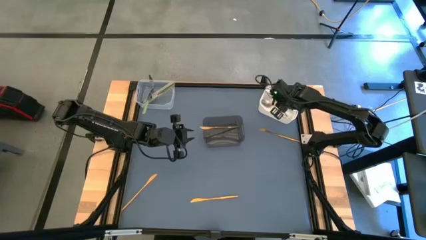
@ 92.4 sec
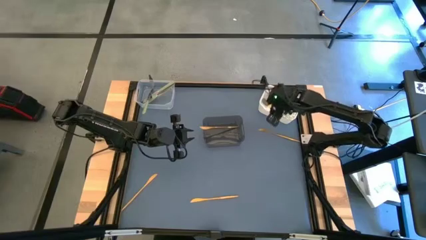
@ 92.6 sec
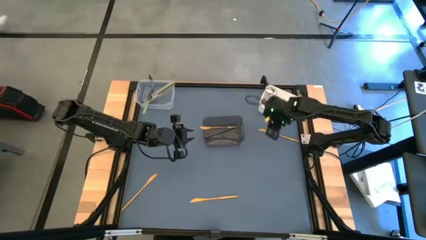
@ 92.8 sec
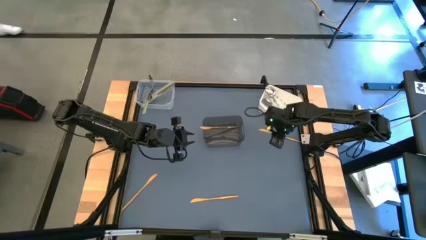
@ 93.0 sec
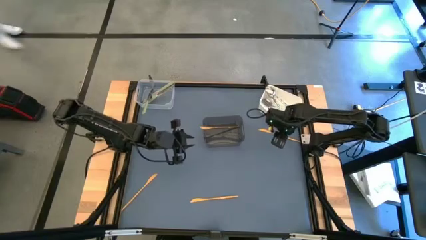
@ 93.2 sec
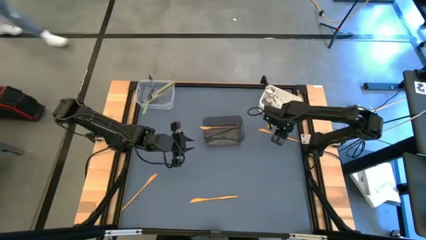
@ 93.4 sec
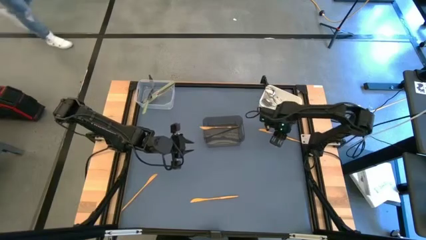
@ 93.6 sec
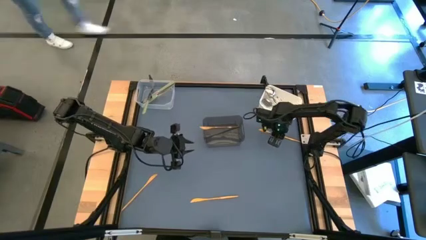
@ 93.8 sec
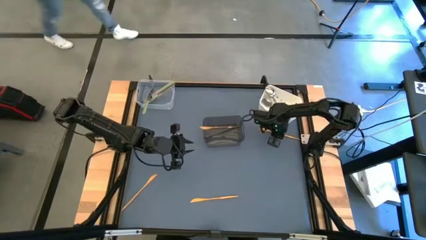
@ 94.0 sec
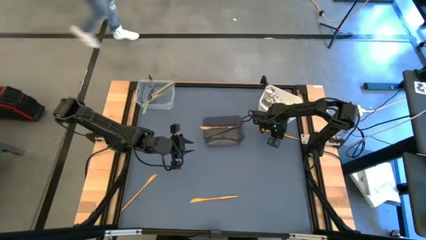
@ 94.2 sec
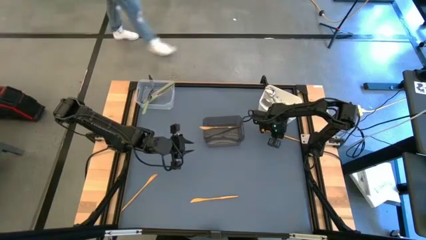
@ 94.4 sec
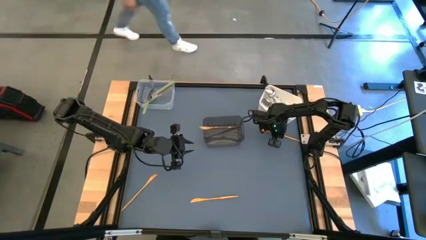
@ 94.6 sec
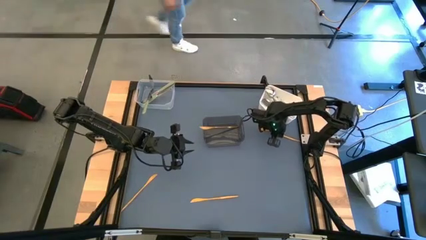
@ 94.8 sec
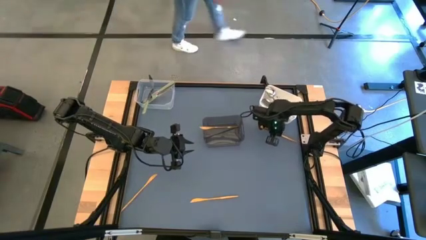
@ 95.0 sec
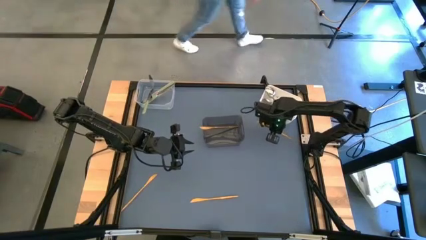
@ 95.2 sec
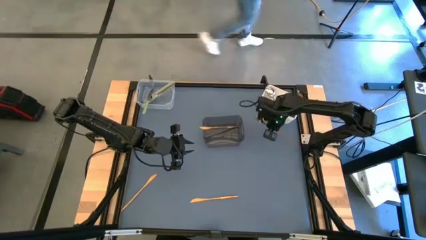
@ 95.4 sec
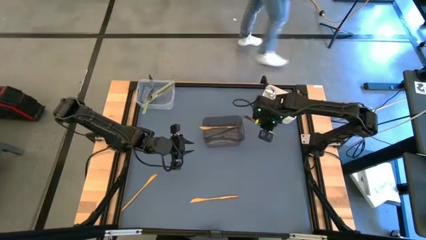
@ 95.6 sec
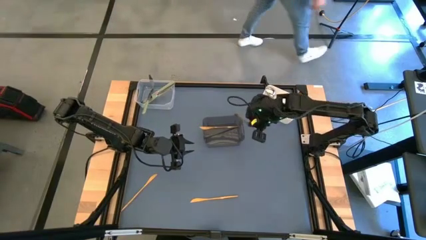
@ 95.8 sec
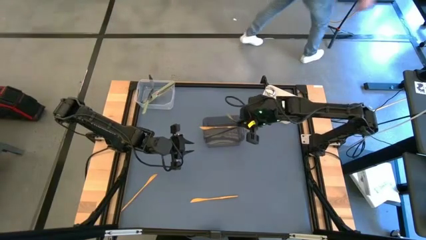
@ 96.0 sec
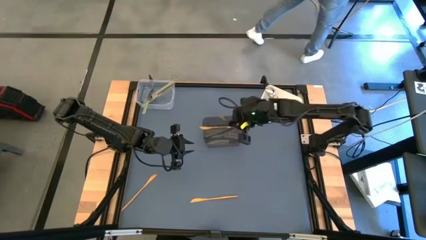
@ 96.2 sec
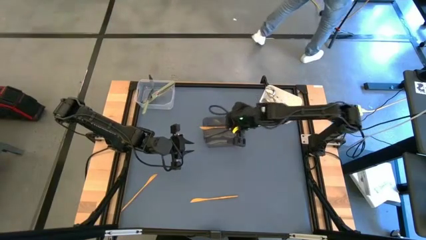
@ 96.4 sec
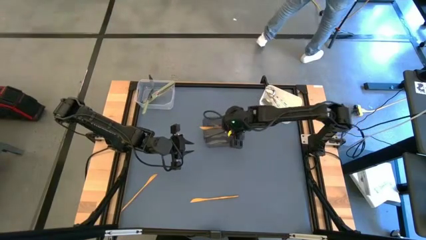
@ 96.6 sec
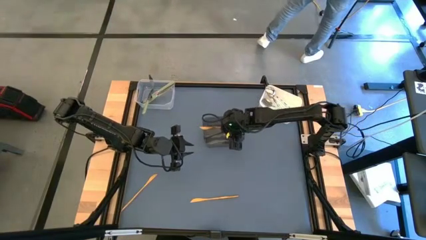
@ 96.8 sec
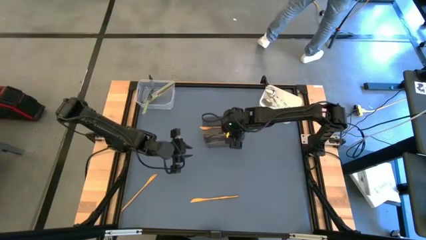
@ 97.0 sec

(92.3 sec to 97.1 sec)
Task: Sort silverware by color (type)
Put the gold knife into the black bin

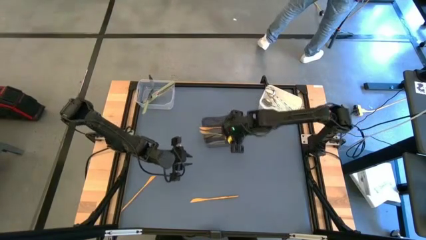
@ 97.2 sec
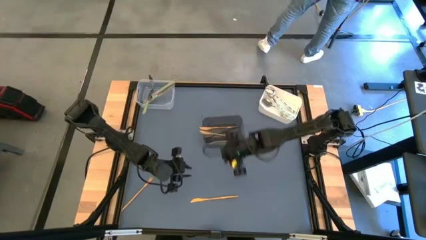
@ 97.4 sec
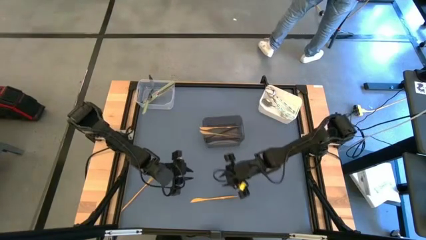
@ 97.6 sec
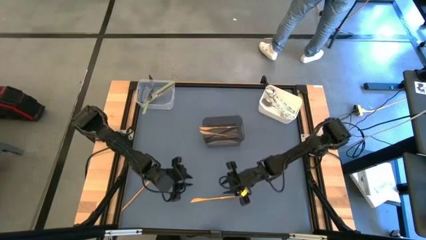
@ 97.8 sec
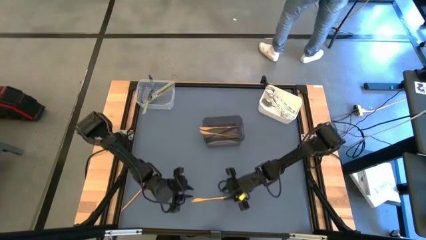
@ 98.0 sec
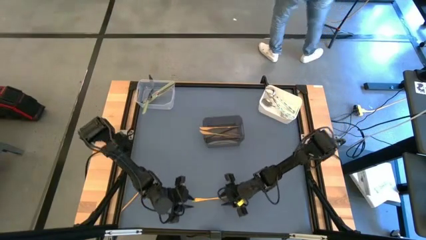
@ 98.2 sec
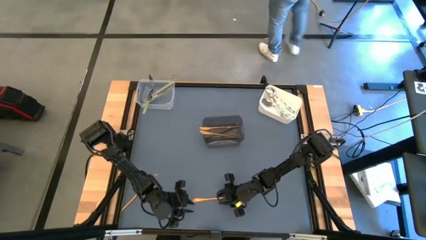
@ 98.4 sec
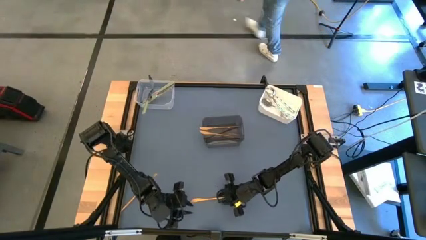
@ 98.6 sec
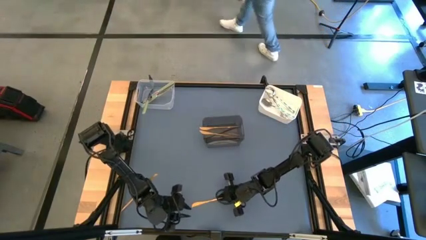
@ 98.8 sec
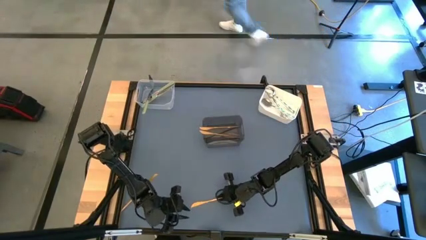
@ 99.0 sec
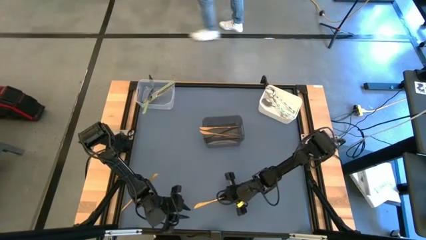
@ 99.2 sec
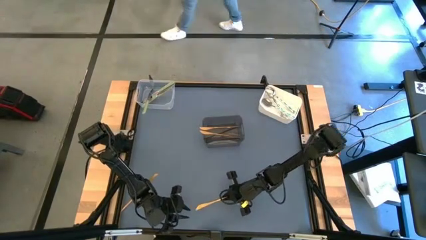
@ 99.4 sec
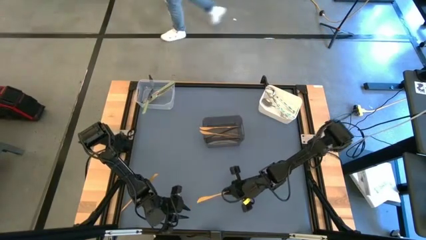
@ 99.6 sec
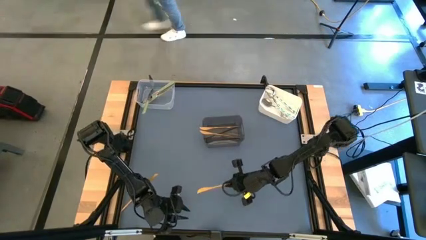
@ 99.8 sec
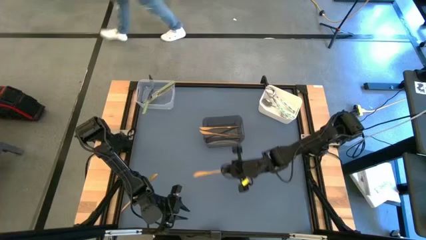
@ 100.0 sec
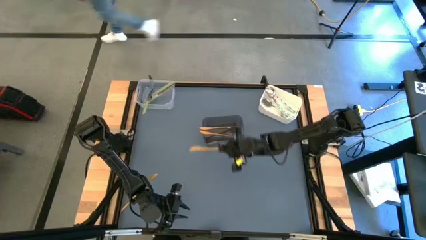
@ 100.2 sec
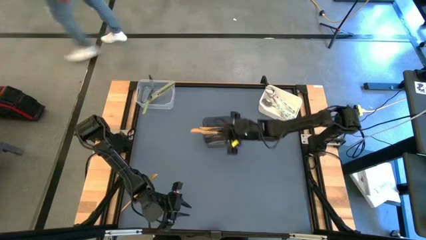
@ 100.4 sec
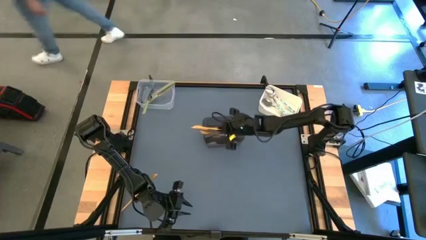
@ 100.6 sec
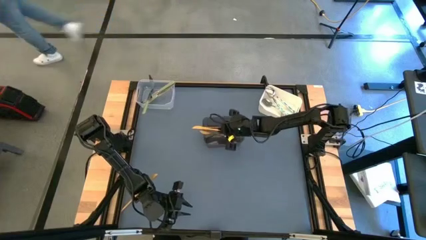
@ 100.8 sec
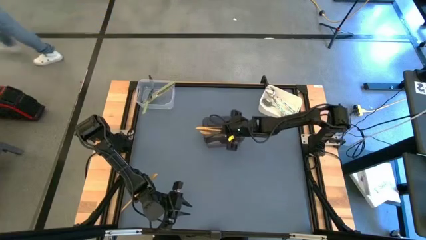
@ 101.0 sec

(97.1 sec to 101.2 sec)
Put the gold knife into the black bin

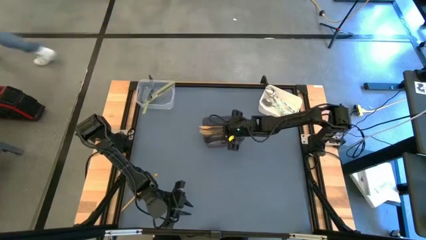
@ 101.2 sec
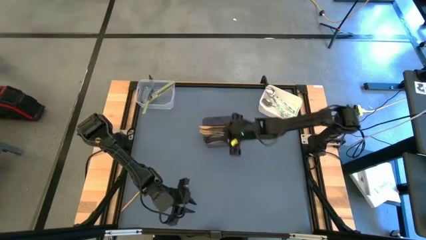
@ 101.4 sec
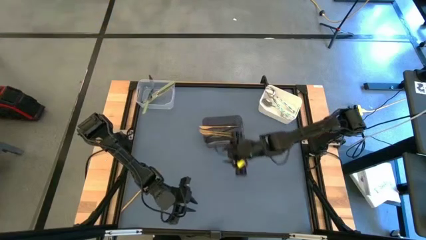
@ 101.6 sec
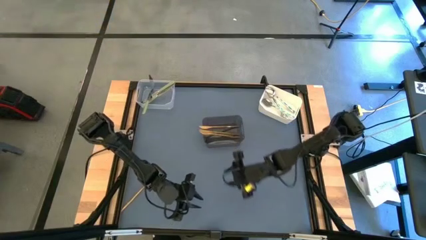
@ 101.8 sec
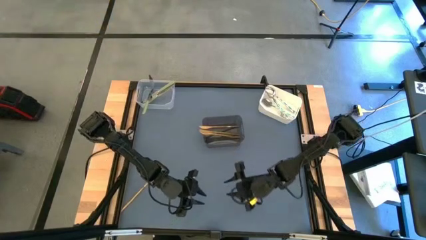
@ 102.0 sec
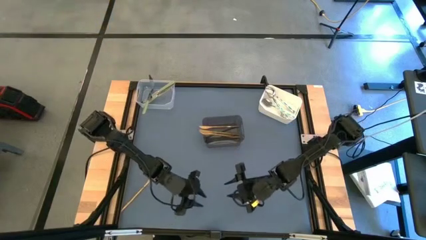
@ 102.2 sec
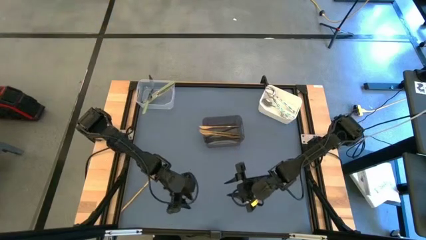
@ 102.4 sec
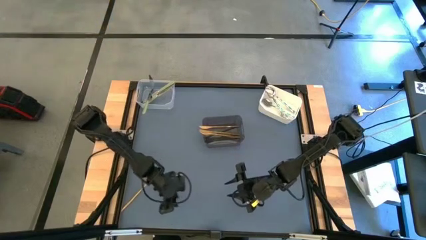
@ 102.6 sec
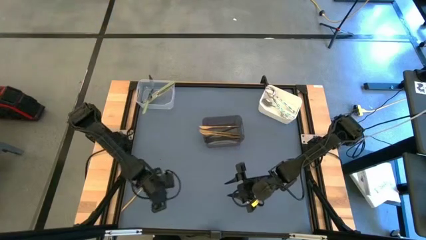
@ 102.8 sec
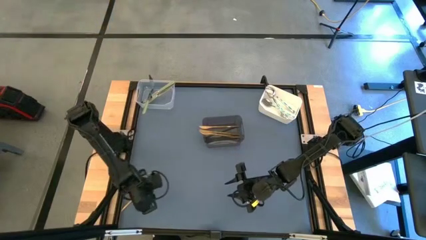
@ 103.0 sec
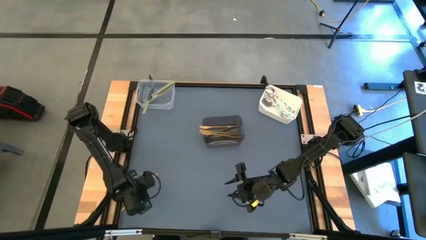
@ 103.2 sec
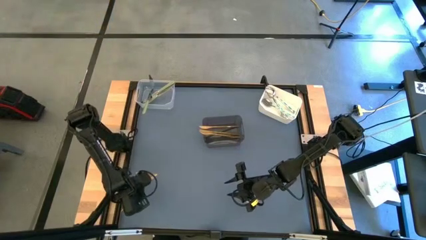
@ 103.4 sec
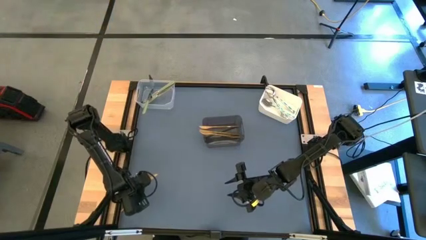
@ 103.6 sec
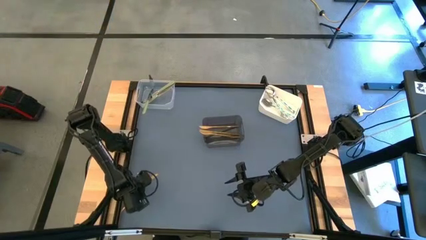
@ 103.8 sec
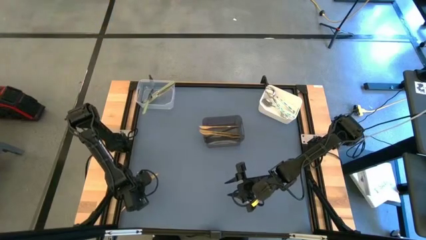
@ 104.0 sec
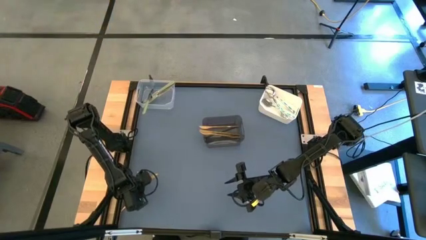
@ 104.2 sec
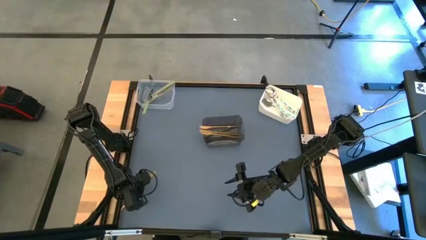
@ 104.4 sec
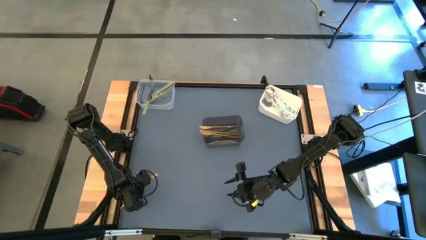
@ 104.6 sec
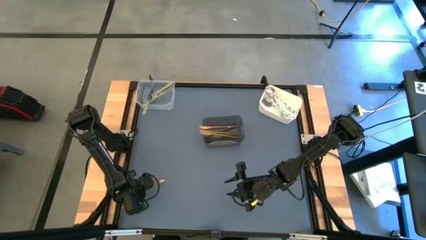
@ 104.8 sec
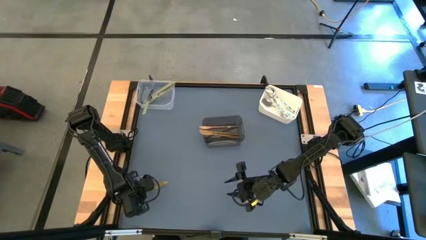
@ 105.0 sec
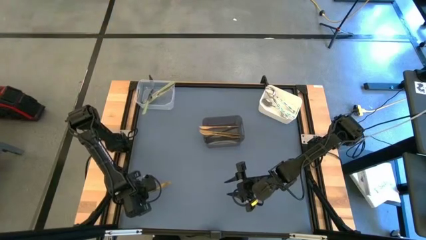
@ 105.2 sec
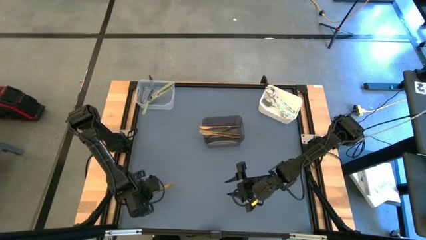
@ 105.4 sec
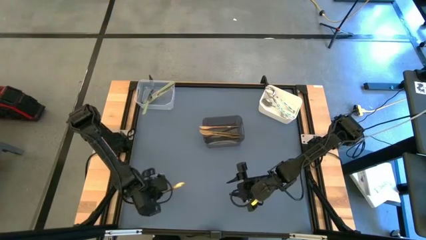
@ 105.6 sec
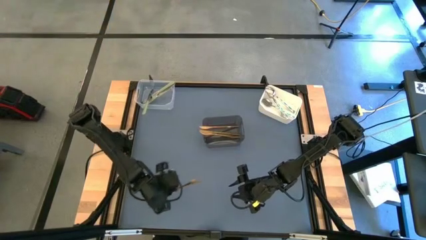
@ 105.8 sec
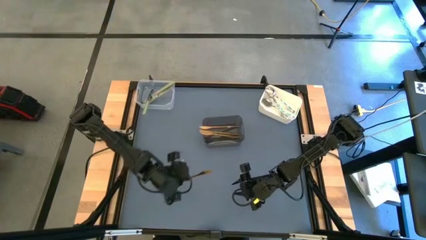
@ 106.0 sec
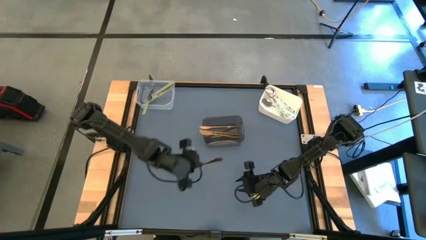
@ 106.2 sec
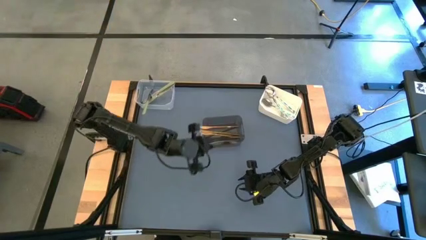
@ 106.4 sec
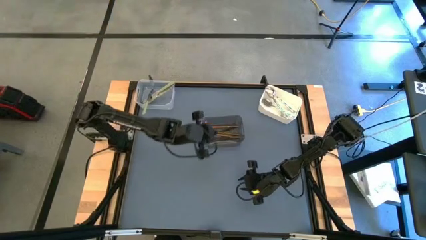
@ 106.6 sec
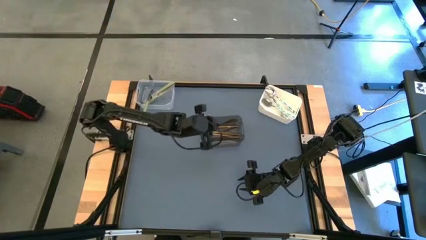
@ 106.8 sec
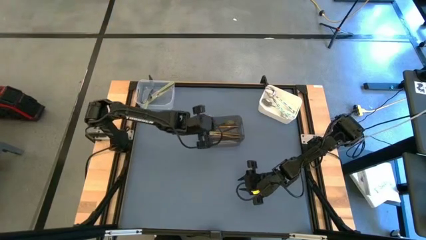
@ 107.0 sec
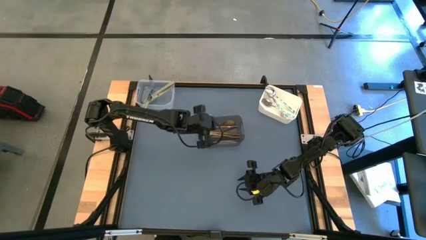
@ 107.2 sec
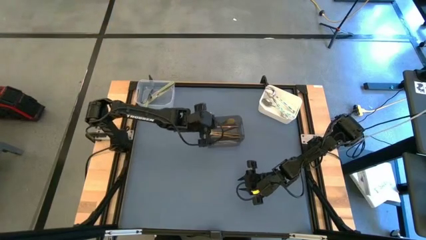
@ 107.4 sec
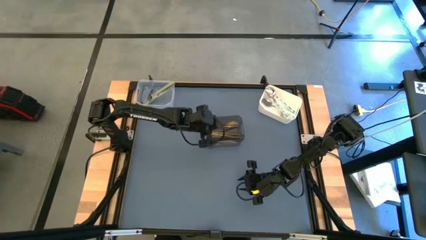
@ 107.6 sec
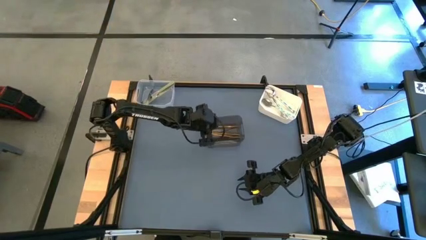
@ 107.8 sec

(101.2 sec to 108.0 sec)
Put the gold knife into the black bin
